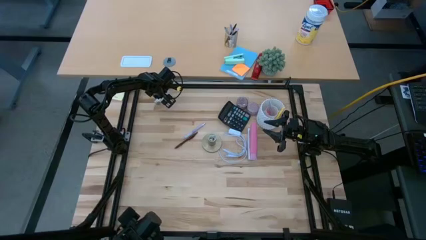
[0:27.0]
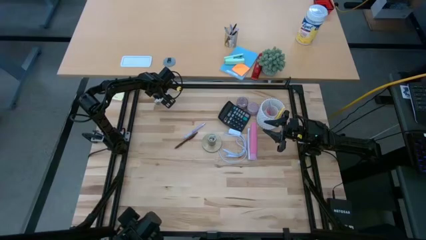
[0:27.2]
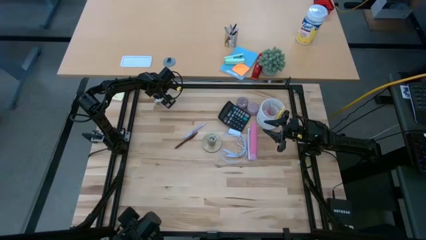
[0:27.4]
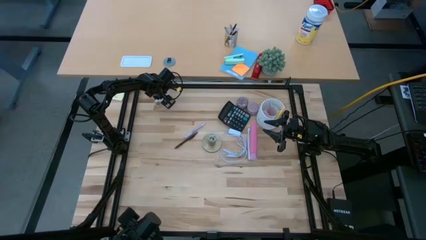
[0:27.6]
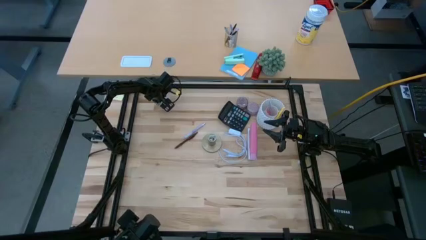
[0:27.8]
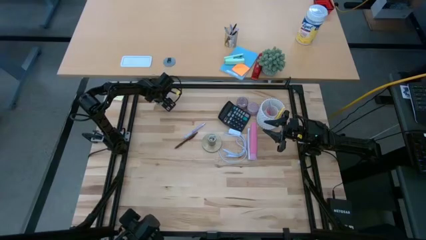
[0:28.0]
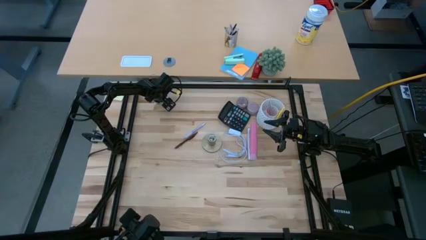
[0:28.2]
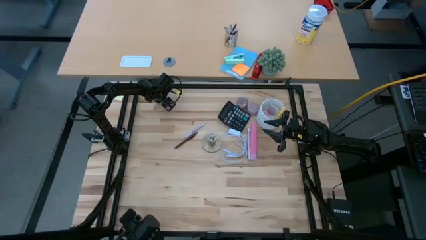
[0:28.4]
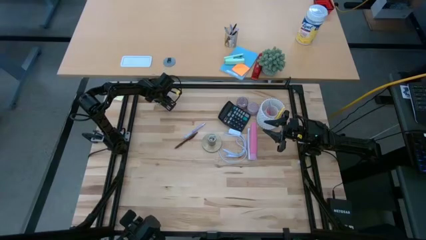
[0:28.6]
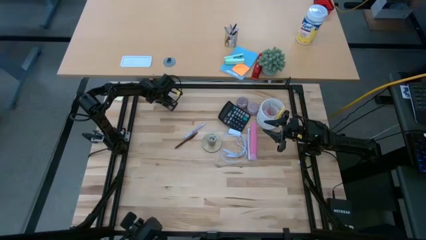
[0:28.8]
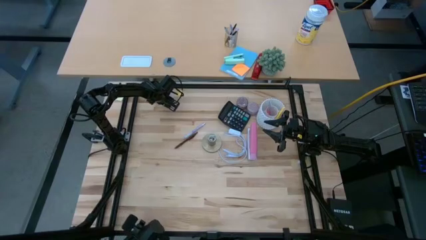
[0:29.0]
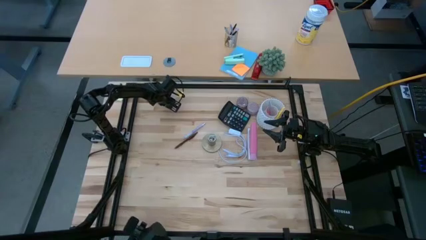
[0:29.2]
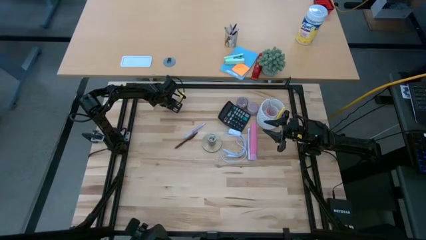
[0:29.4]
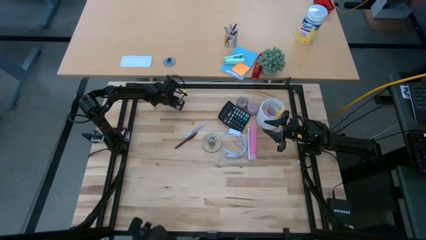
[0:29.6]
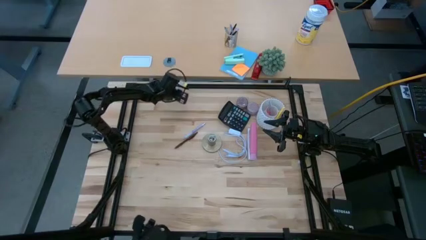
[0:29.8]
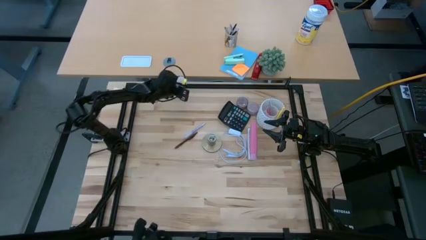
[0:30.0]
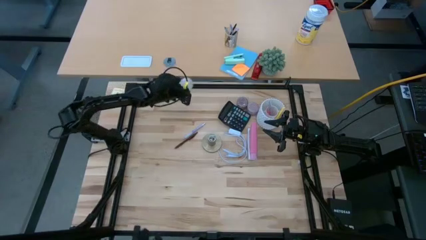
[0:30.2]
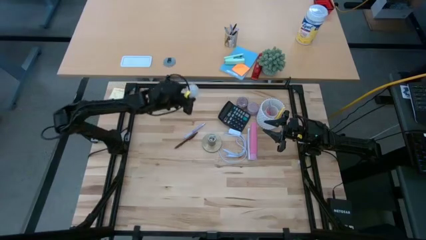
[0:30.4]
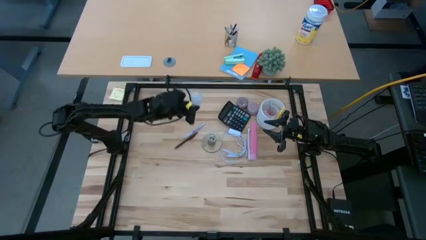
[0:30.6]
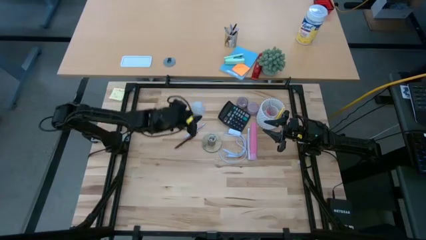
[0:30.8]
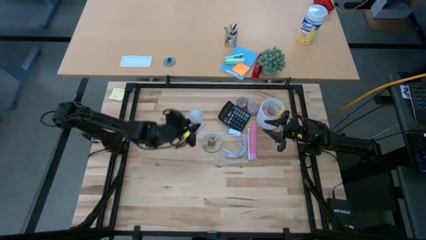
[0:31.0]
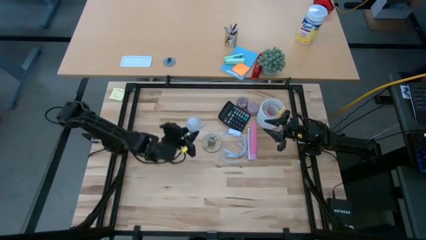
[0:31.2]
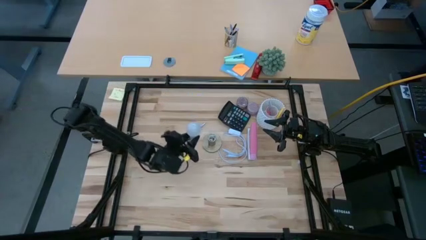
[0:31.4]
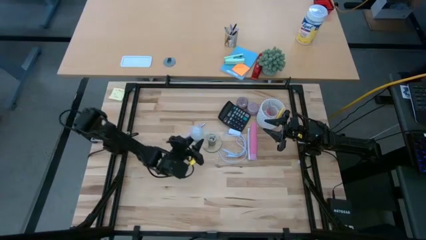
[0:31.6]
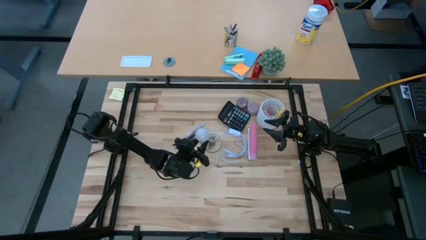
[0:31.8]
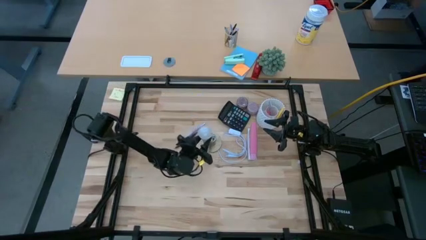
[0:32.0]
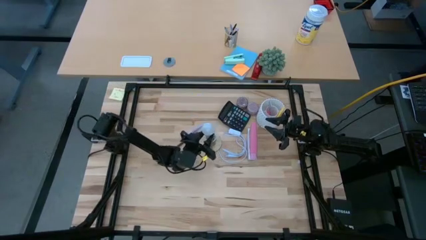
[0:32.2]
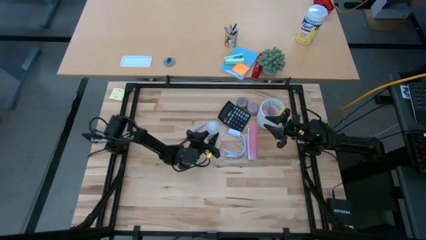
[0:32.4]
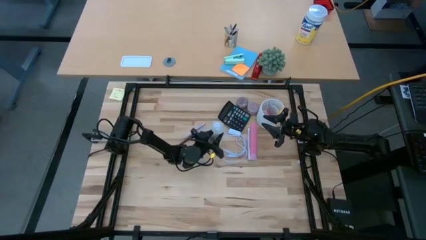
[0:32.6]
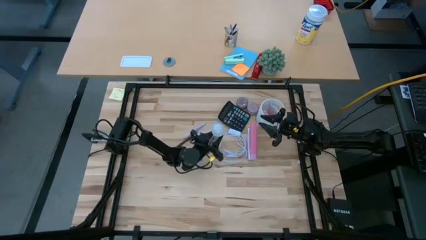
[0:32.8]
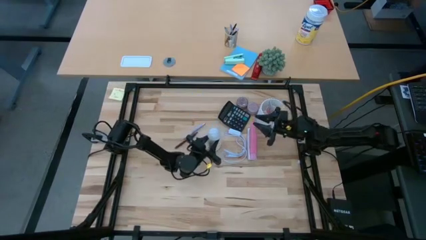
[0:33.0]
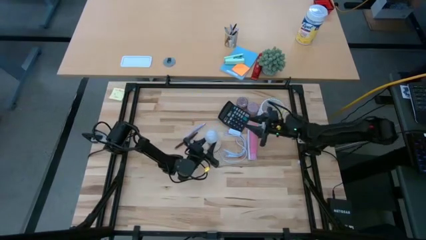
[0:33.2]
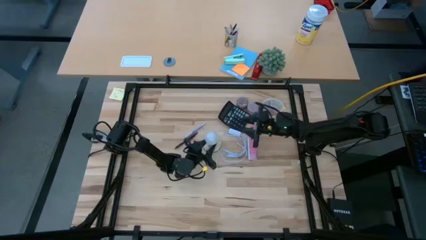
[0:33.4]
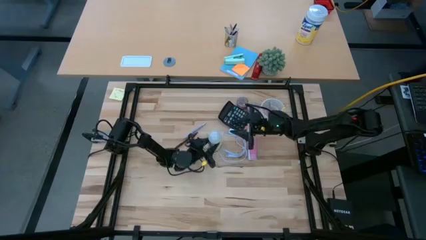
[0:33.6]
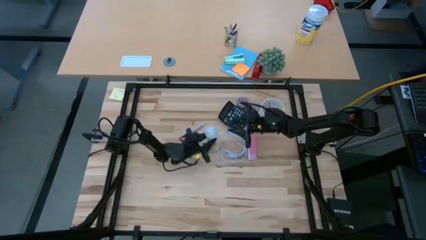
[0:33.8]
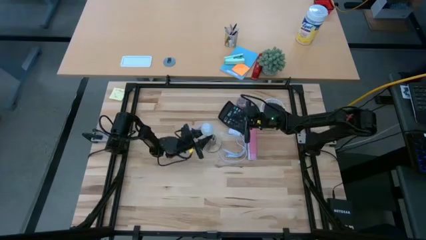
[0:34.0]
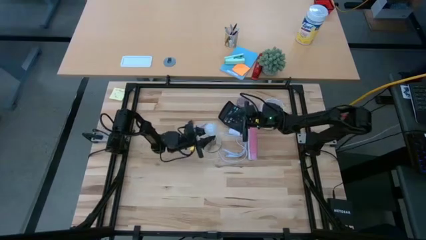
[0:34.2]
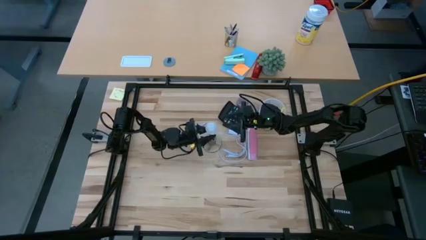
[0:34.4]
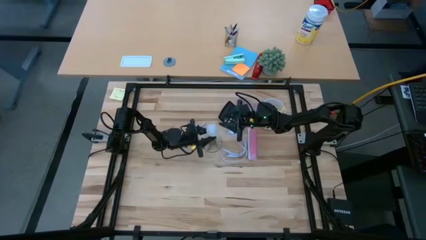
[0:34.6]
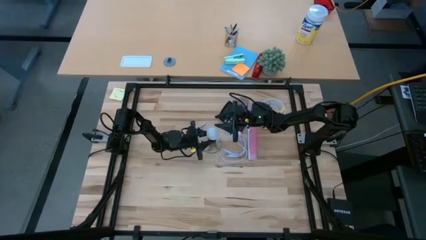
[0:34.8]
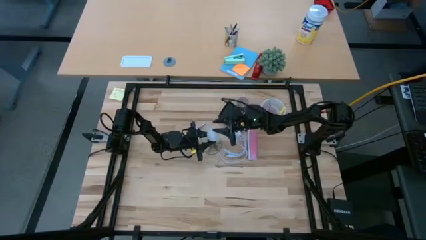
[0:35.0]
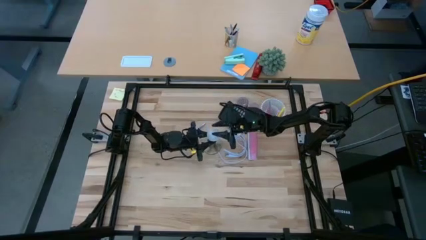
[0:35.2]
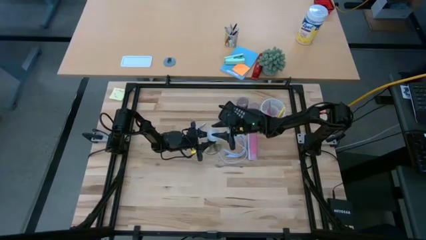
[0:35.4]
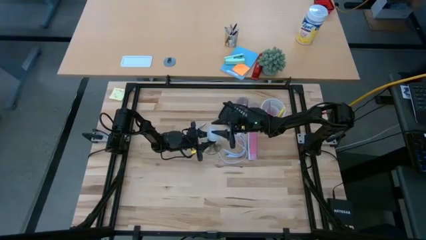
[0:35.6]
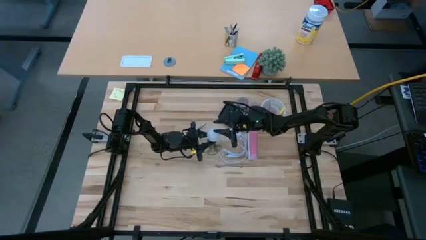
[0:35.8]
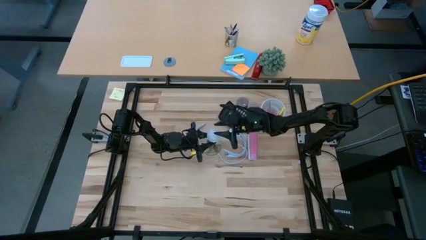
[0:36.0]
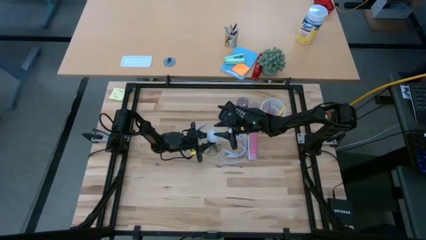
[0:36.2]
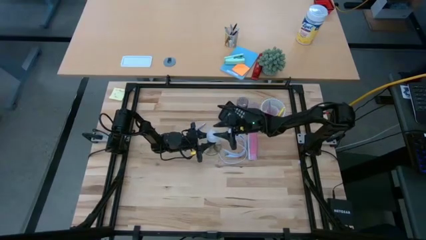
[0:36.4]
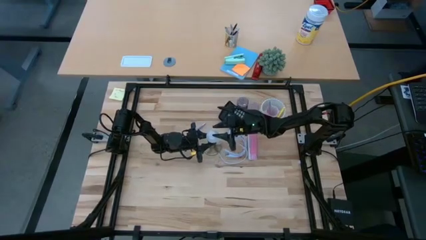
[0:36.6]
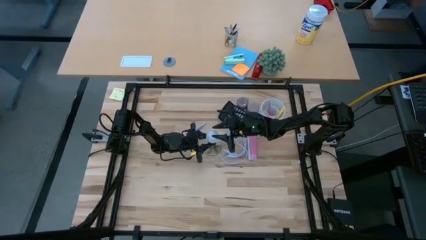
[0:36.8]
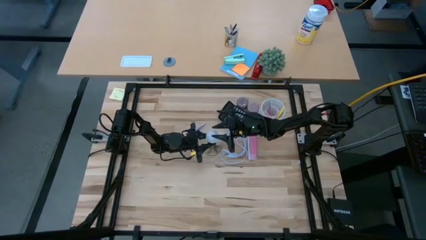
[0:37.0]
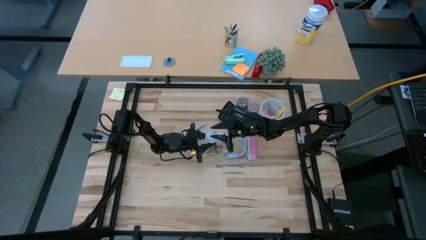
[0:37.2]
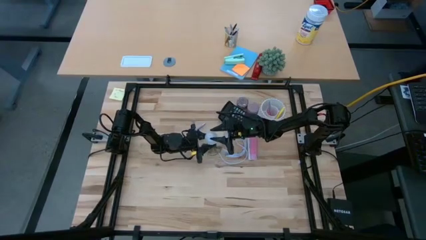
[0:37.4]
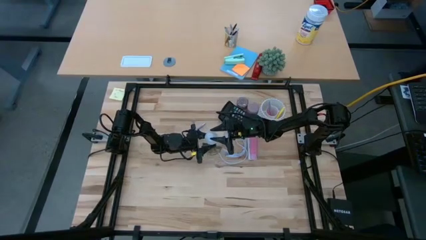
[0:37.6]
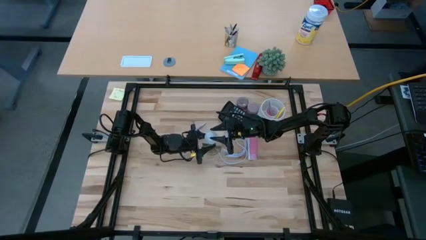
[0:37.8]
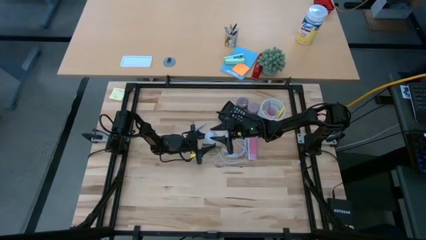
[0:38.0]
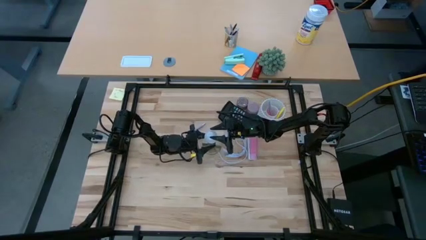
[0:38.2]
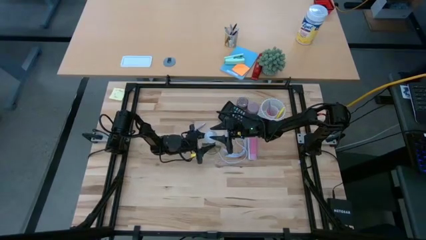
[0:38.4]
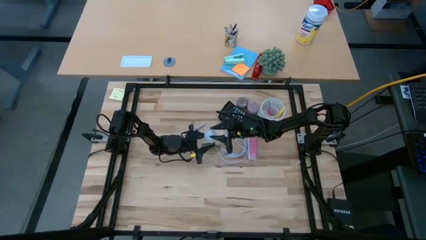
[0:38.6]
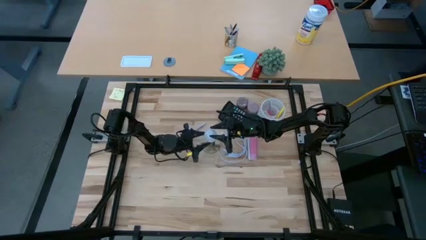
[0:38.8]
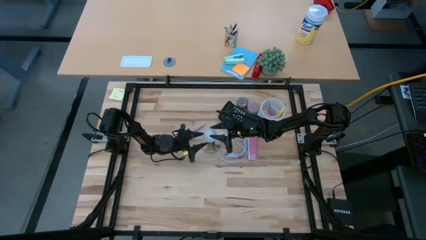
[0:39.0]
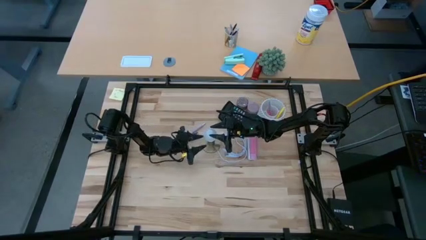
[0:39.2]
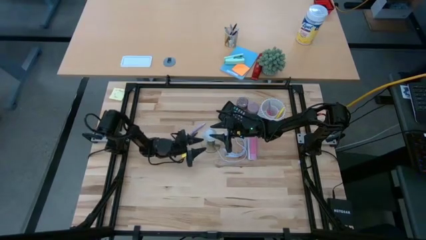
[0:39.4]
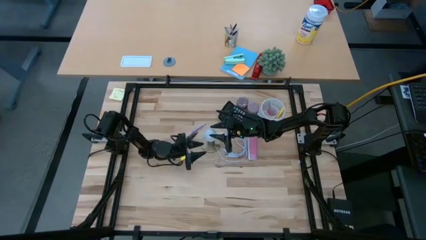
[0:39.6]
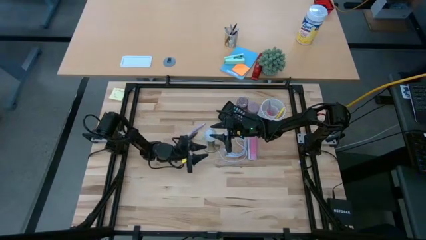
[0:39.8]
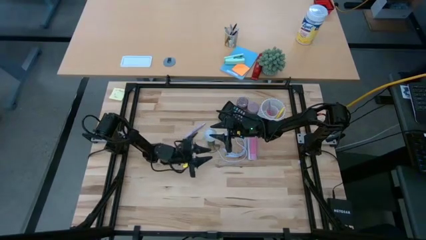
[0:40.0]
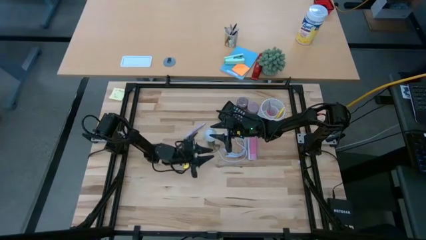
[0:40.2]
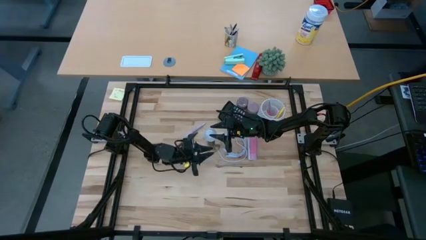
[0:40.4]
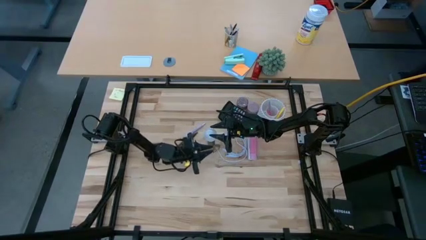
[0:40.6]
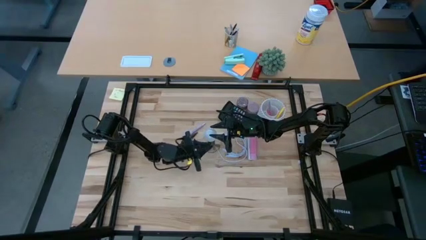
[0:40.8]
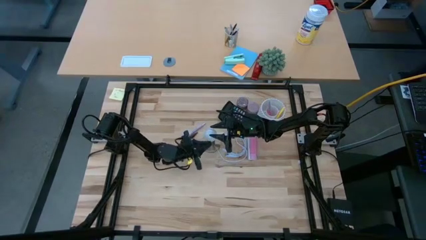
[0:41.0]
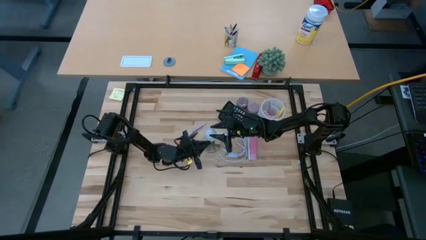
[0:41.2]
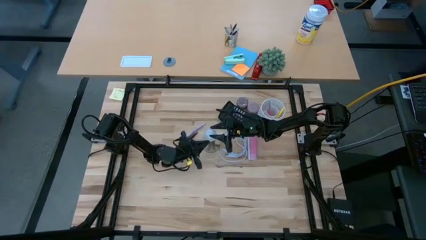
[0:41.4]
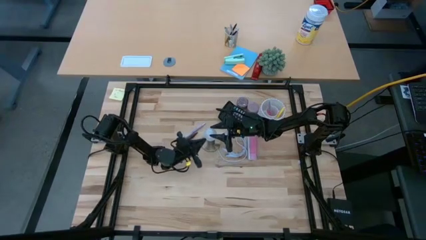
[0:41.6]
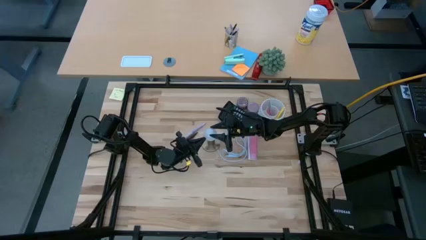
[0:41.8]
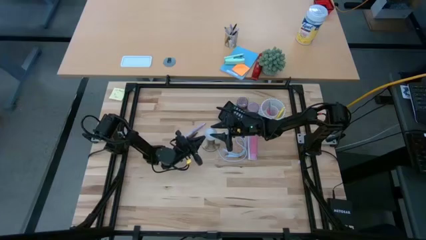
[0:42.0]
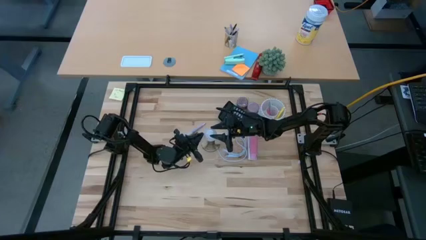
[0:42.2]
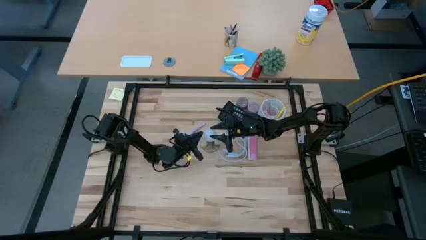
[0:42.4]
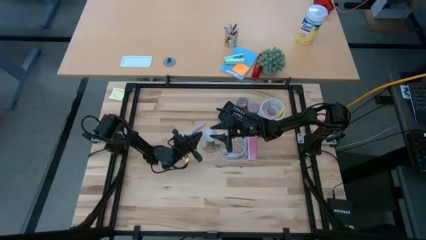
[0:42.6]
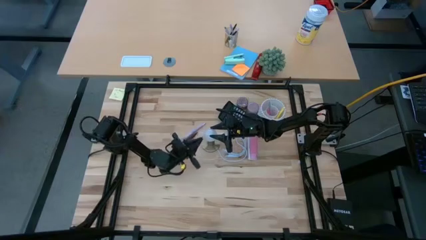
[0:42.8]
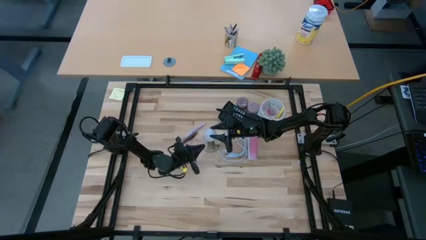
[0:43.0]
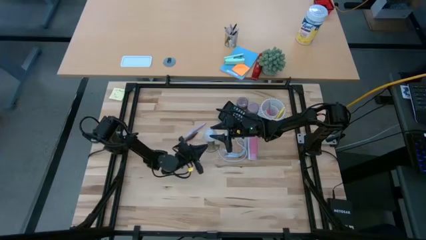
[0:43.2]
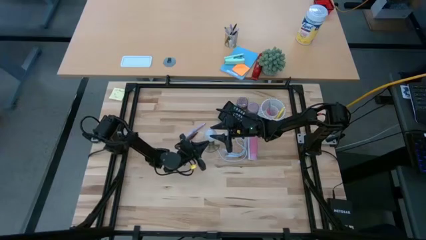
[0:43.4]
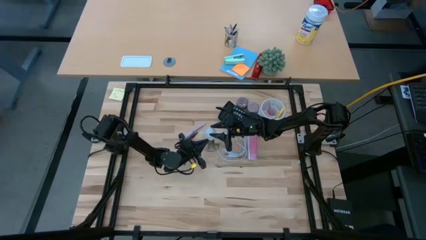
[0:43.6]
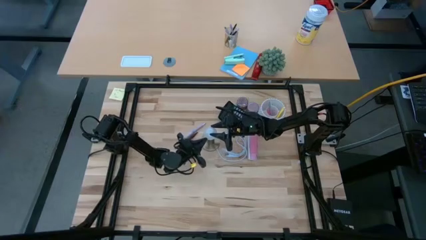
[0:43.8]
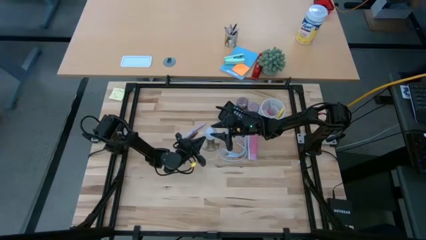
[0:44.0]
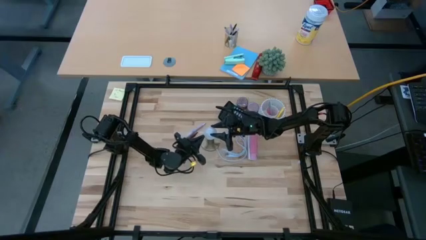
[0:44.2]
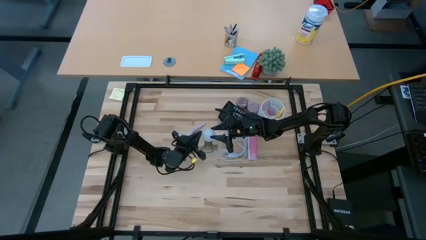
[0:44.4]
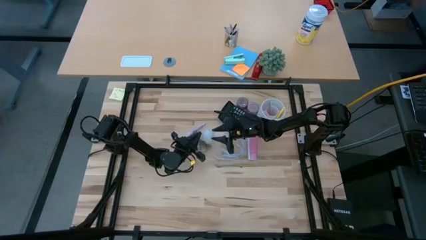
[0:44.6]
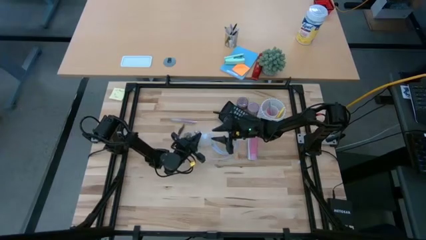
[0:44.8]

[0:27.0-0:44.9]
Task: Screw lightbulb
Insert the lightbulb into the gold lamp
